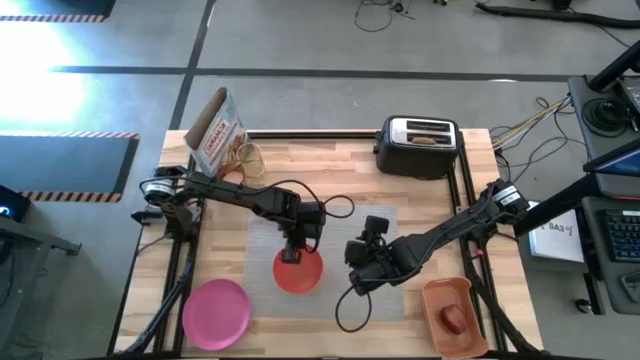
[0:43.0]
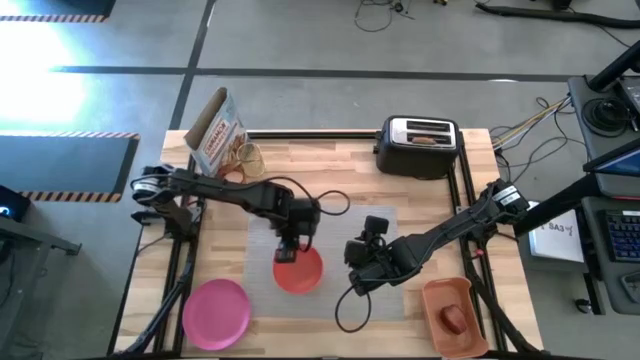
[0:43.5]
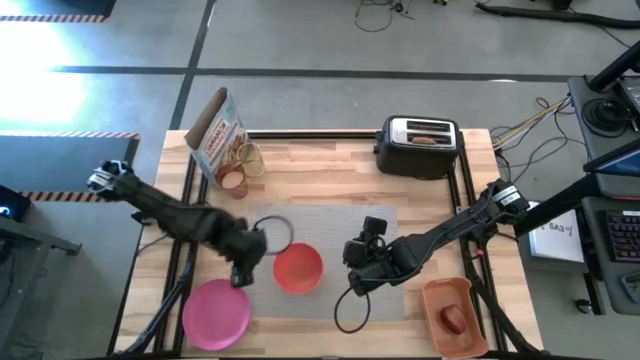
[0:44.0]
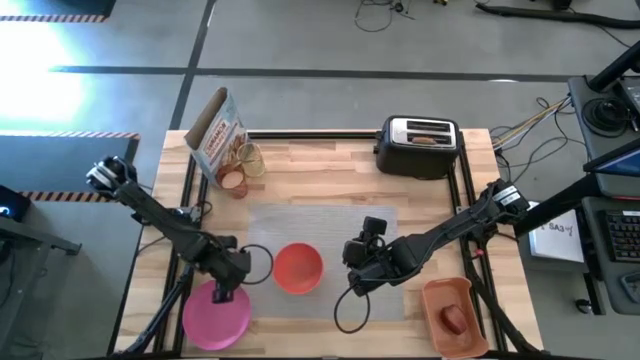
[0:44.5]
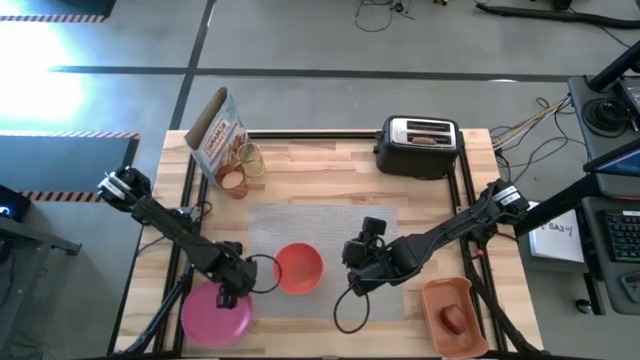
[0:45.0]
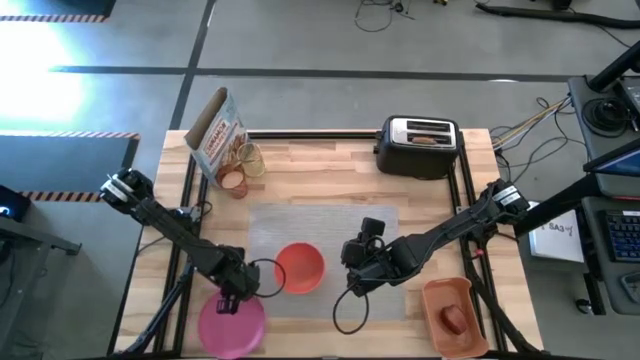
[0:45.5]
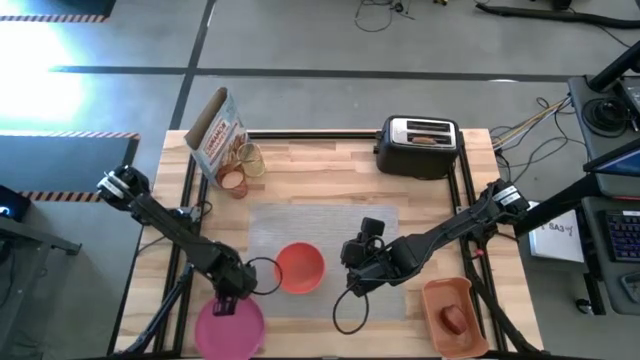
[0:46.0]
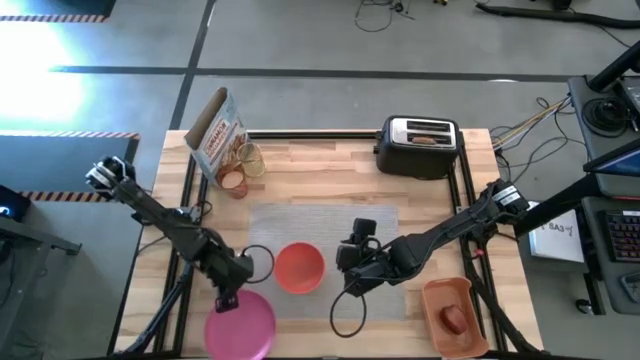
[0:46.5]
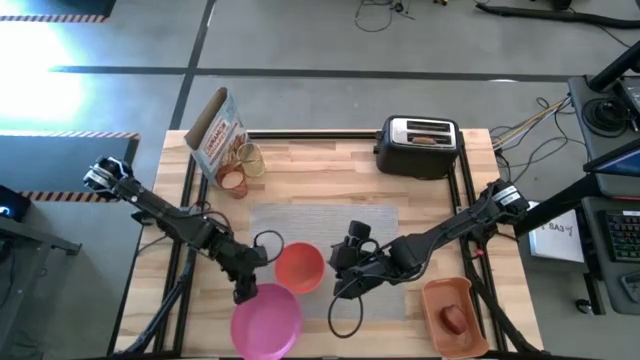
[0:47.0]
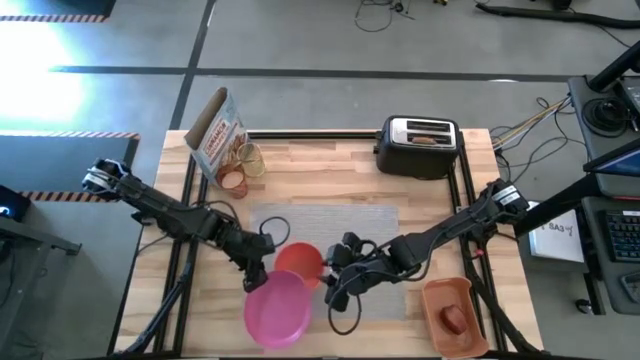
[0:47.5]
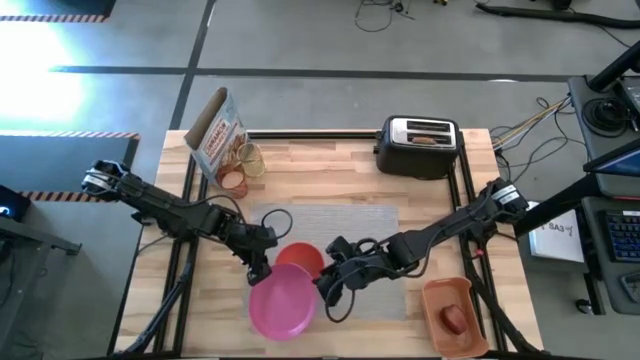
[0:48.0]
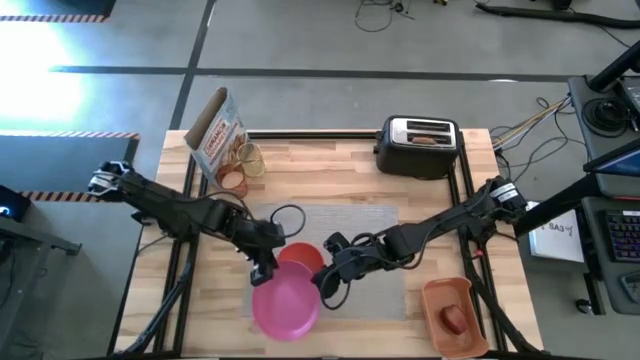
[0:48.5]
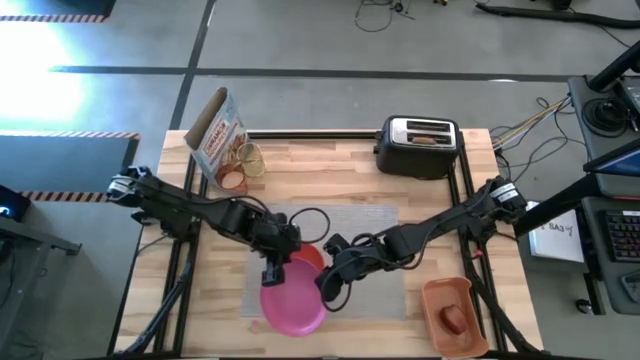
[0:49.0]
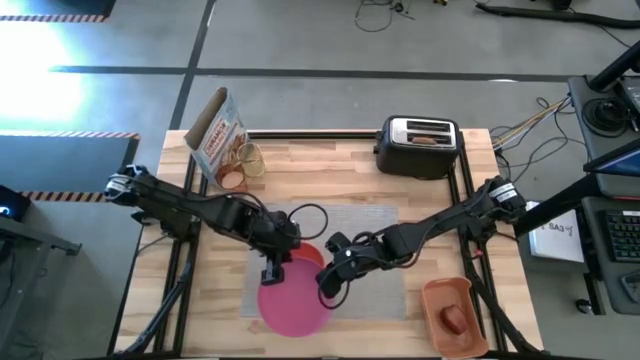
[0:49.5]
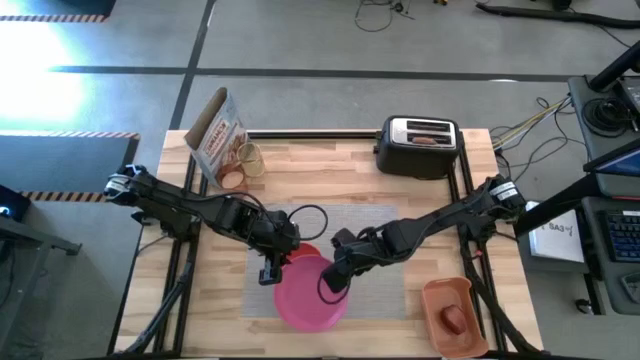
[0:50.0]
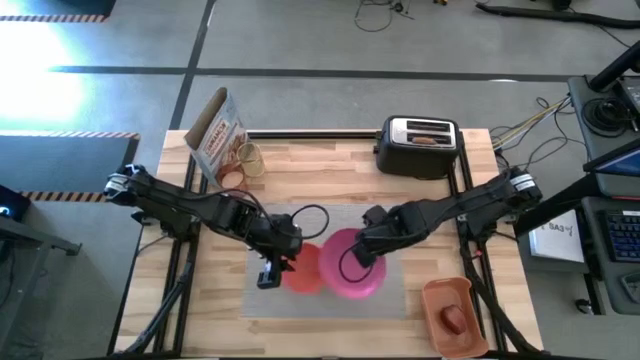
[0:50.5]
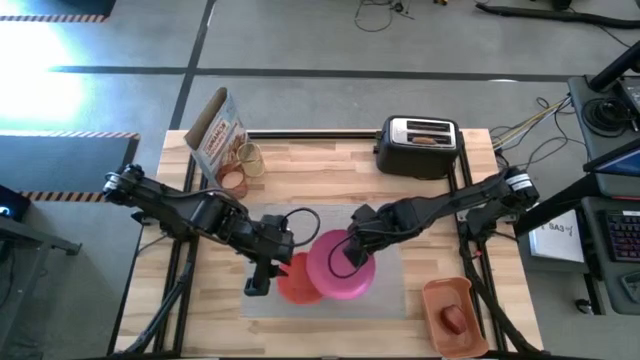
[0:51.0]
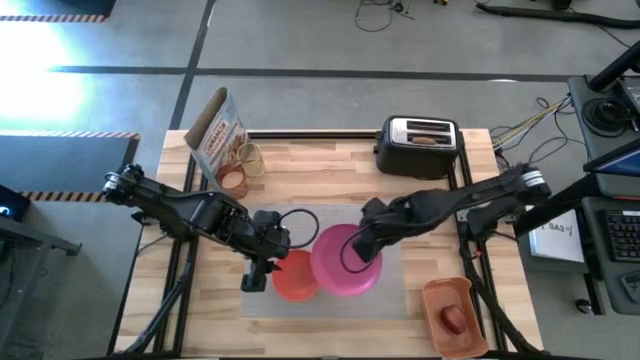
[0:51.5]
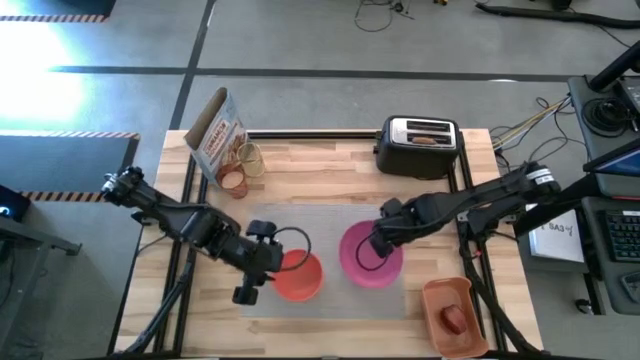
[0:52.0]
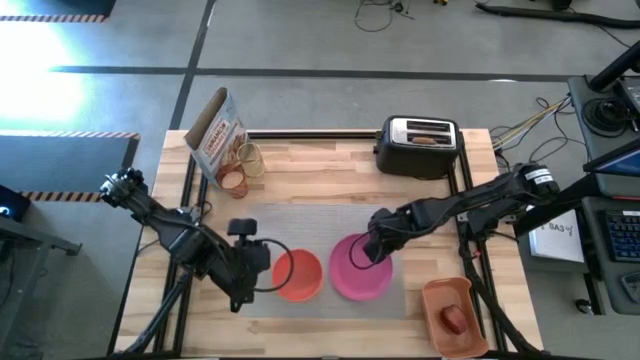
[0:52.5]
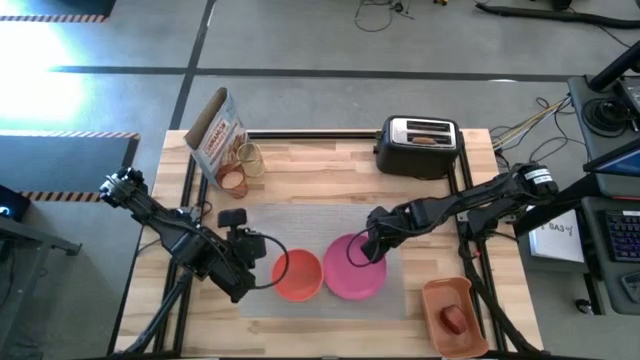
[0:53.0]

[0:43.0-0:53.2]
Task: Arrange a breakfast setting
Put the pink plate to the right of the orange bowl on the gray mat

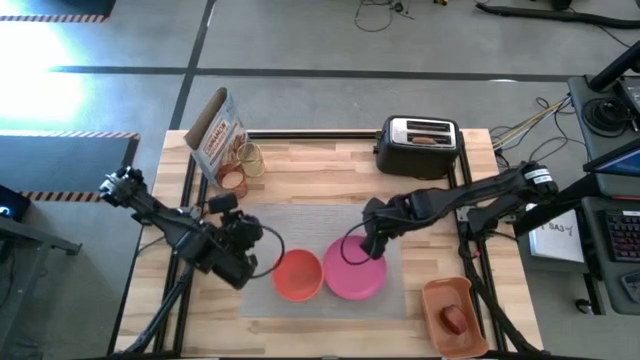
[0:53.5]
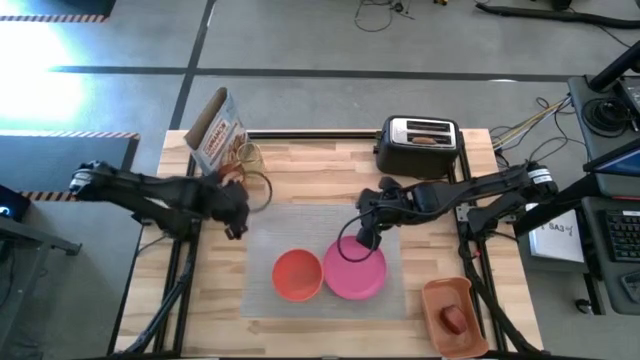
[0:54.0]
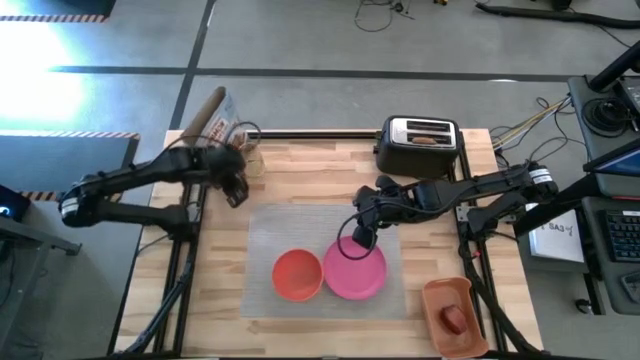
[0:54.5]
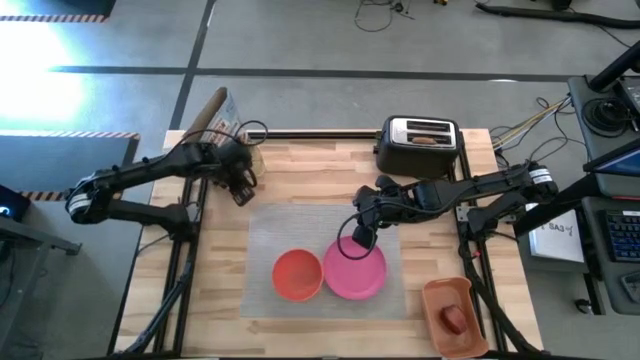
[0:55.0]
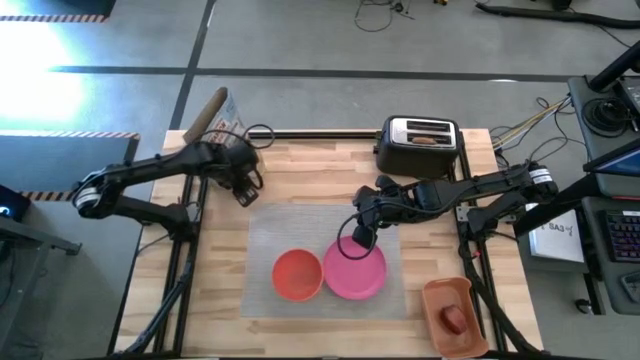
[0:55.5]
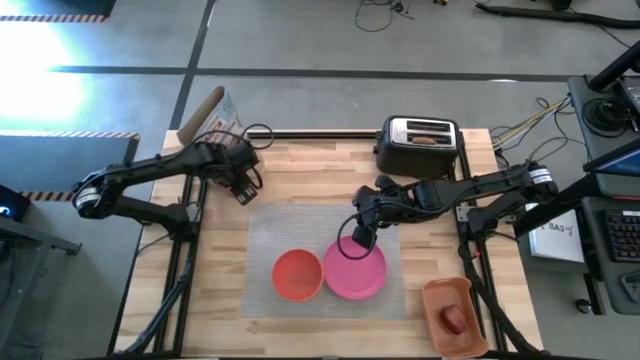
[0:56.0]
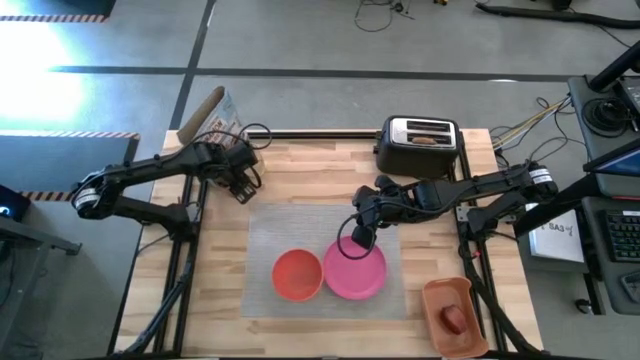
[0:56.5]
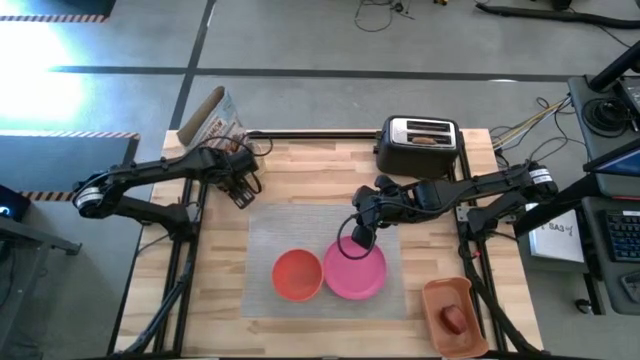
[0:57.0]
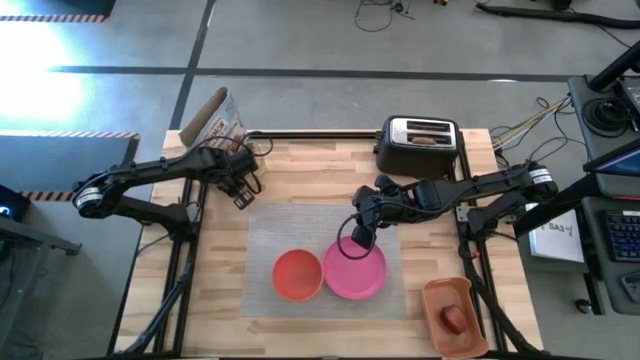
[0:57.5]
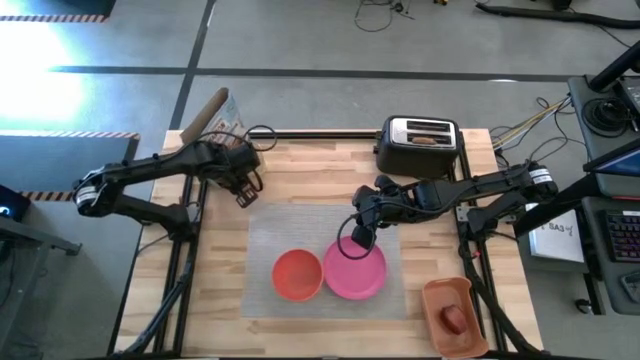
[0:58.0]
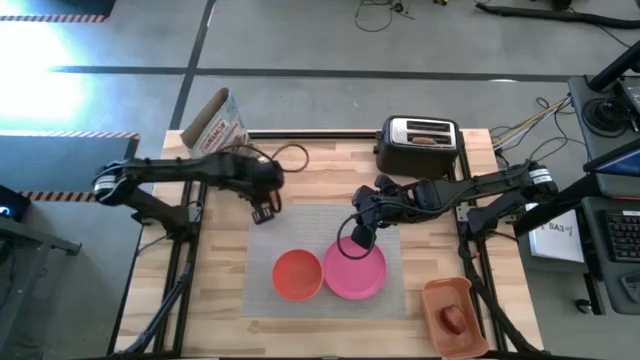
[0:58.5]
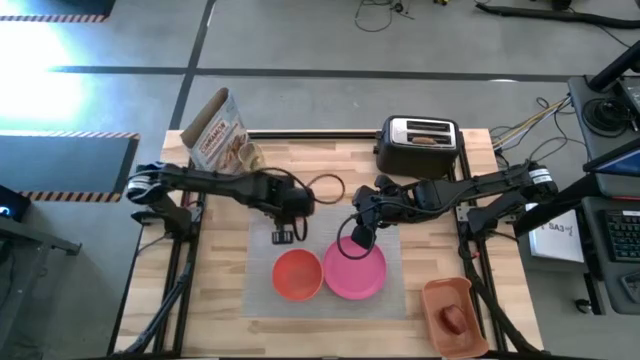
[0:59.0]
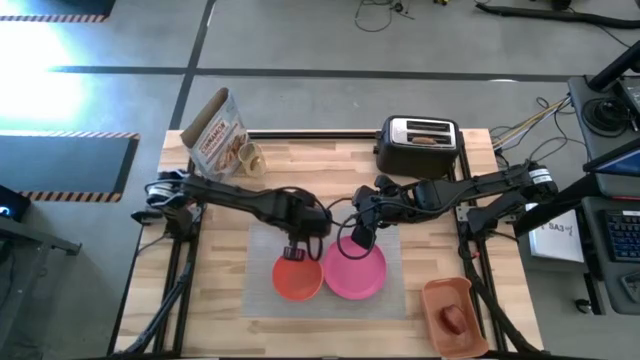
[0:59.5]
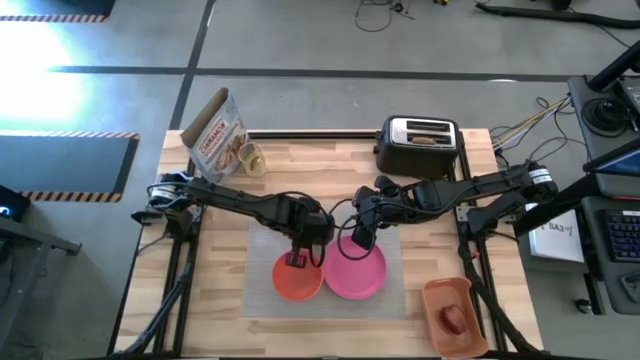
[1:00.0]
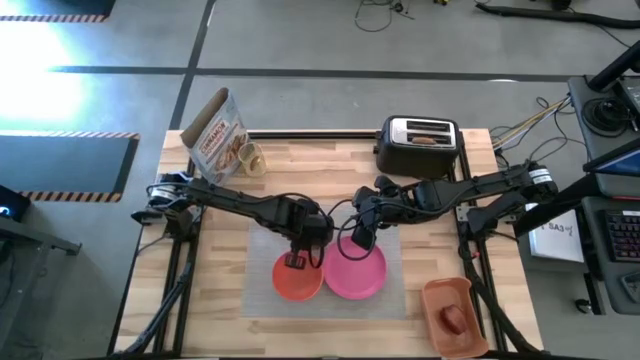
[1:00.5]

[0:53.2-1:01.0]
Put the orange cup to the top of the orange bowl on the gray mat

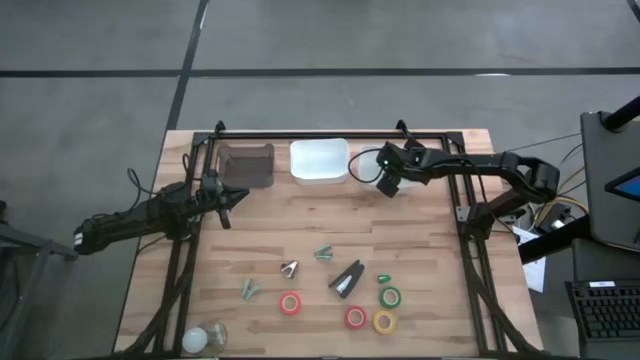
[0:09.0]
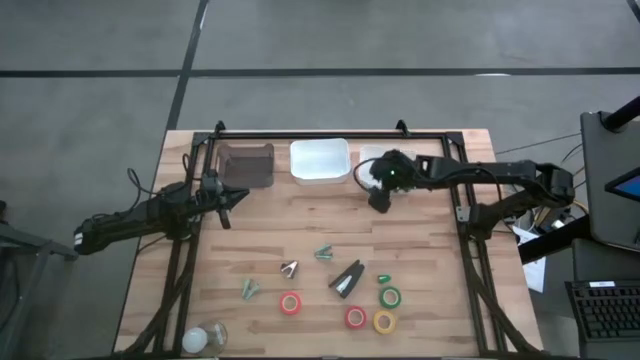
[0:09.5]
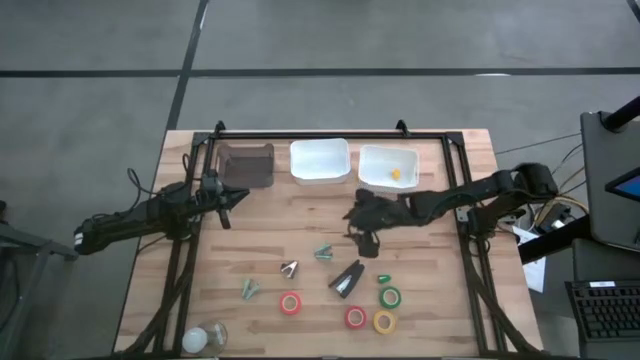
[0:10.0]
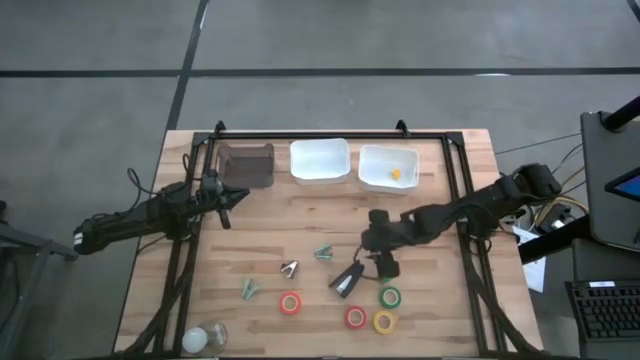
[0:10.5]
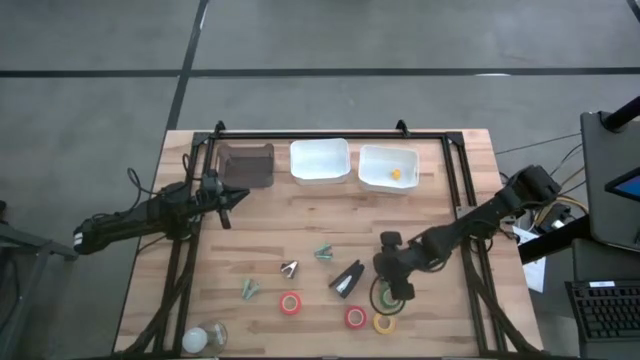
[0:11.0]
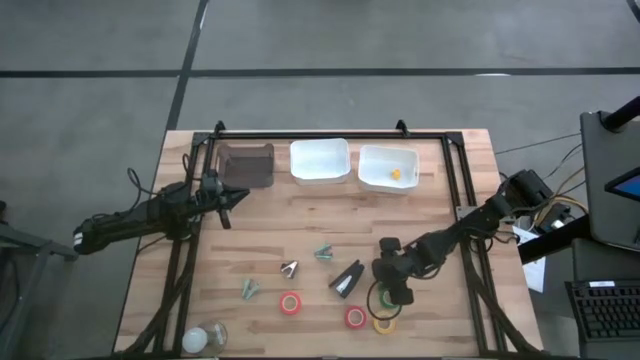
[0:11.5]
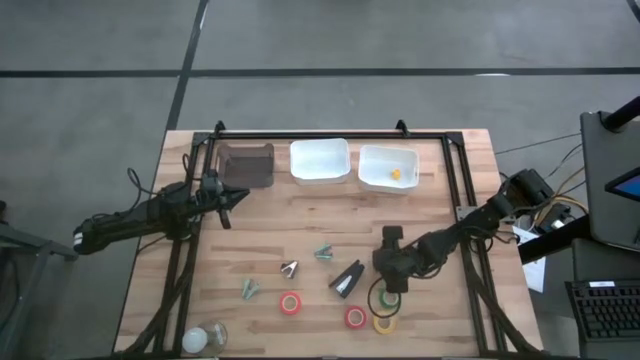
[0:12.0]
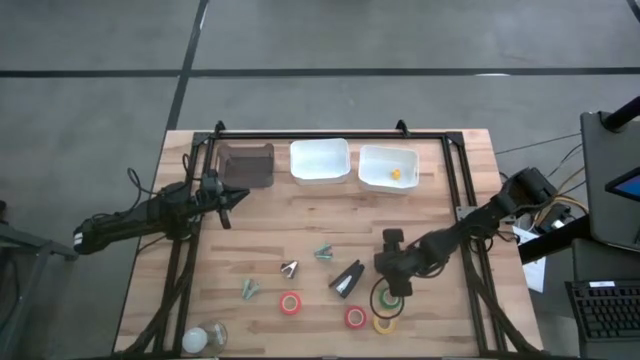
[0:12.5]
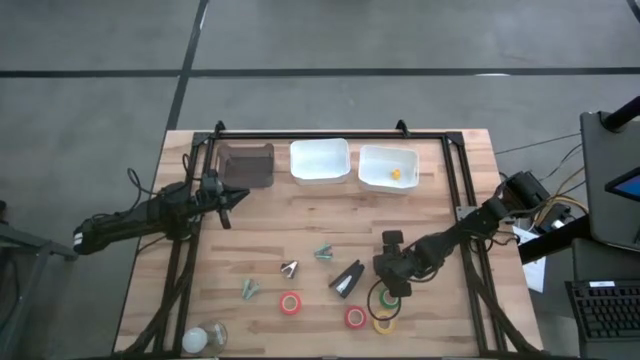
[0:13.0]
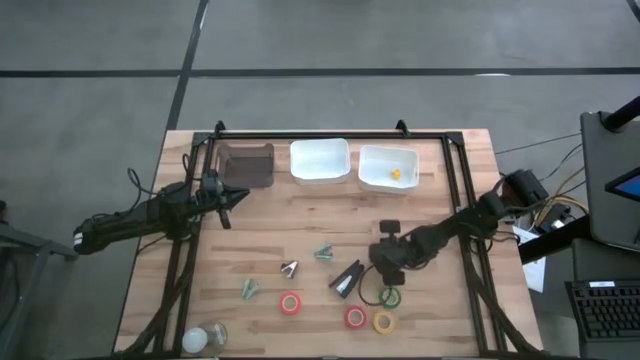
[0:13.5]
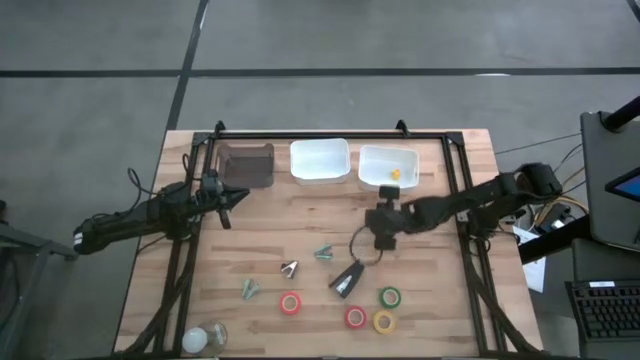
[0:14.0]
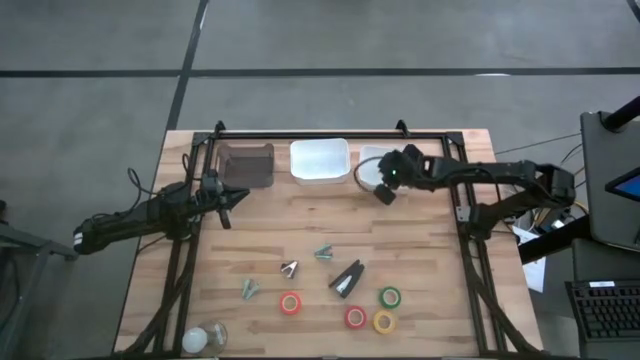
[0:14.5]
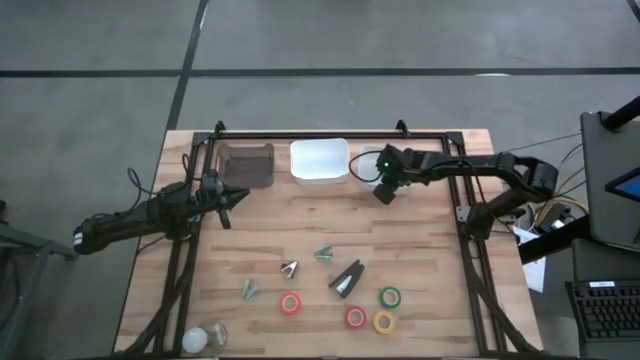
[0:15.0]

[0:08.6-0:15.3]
Task: Pick and place Stapler, Stapler remover, tape
Put the green stapler into the right white bin
